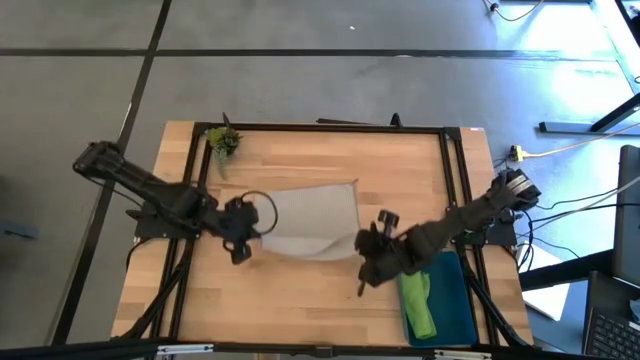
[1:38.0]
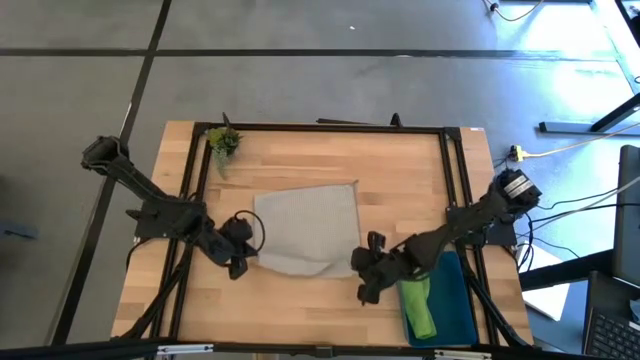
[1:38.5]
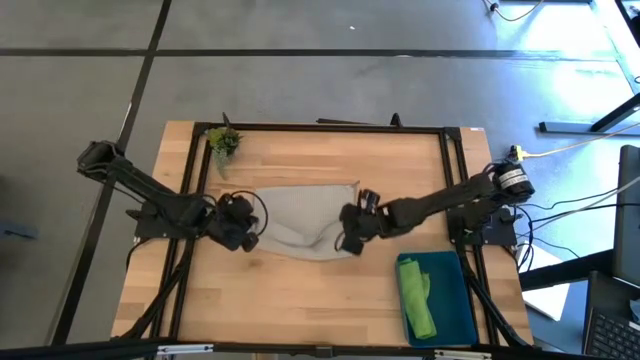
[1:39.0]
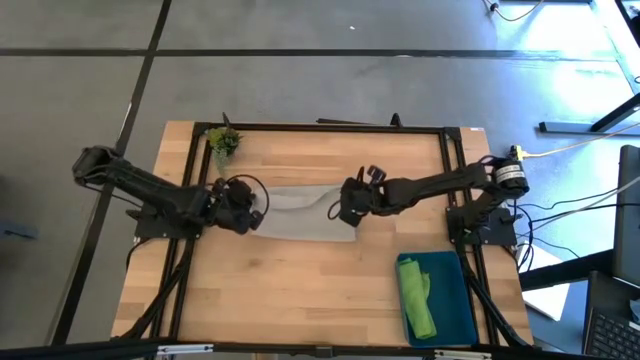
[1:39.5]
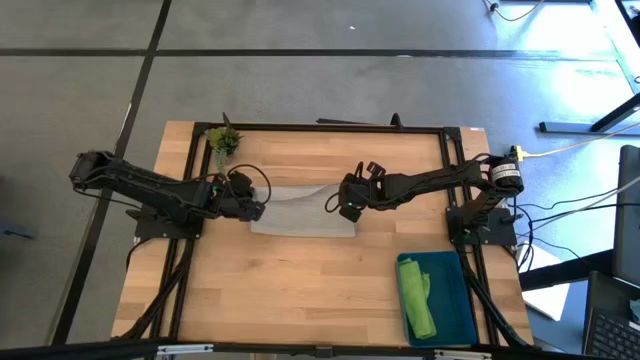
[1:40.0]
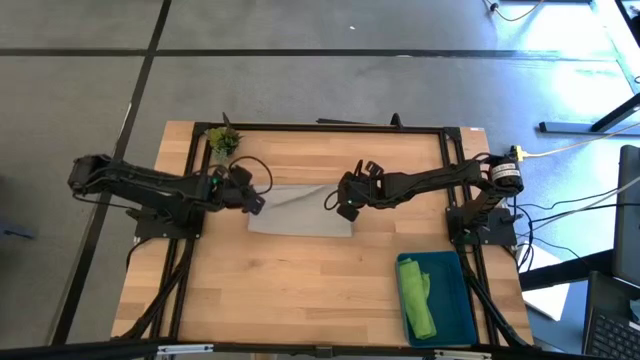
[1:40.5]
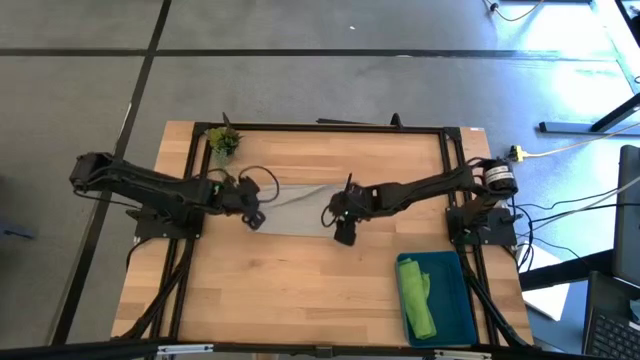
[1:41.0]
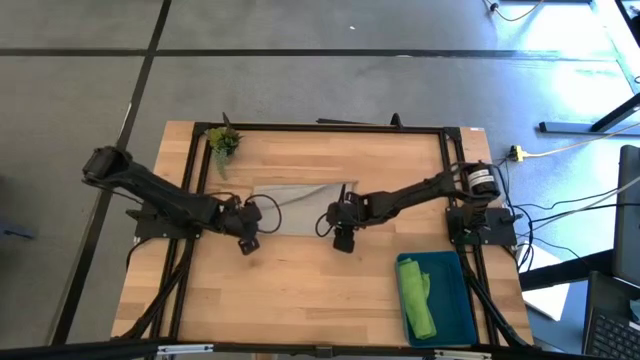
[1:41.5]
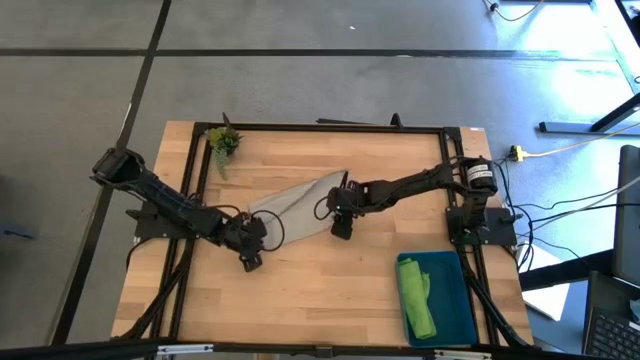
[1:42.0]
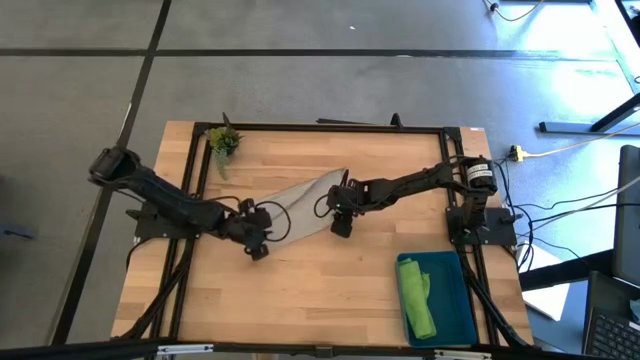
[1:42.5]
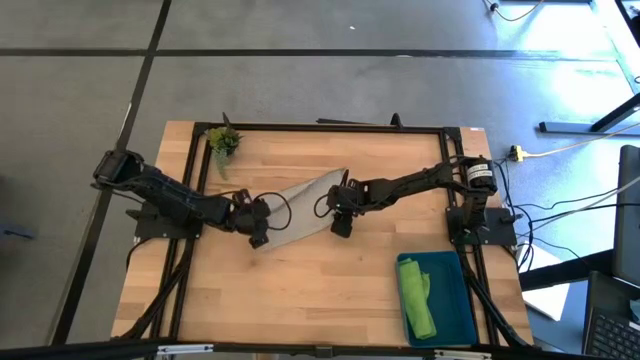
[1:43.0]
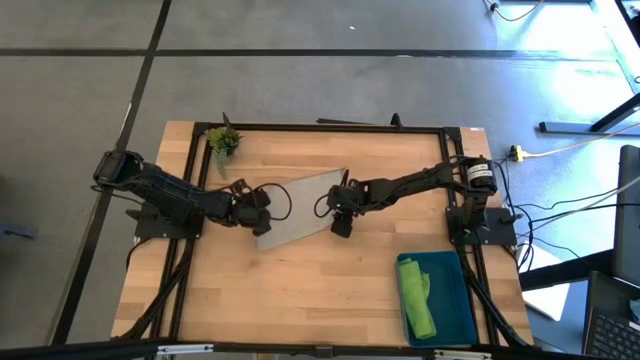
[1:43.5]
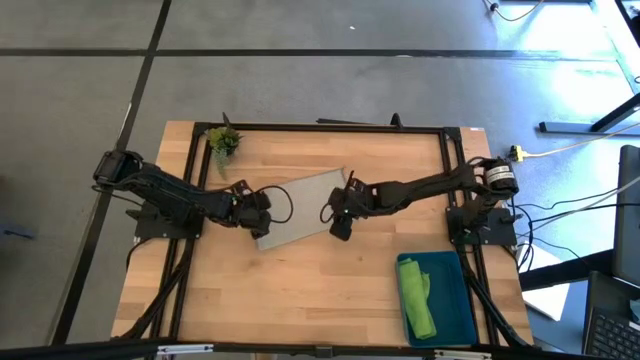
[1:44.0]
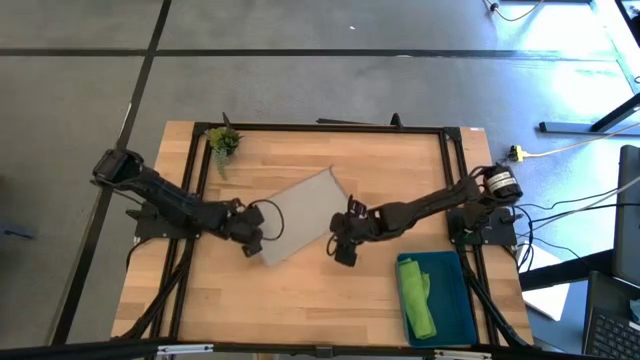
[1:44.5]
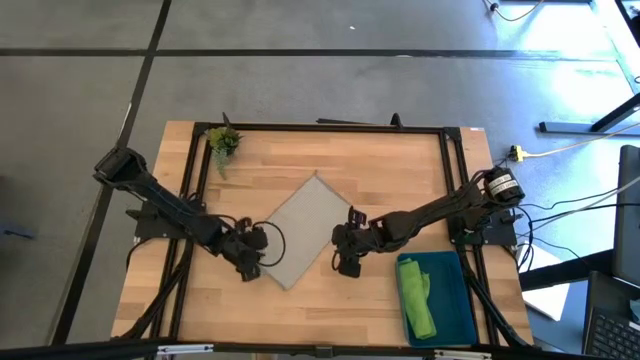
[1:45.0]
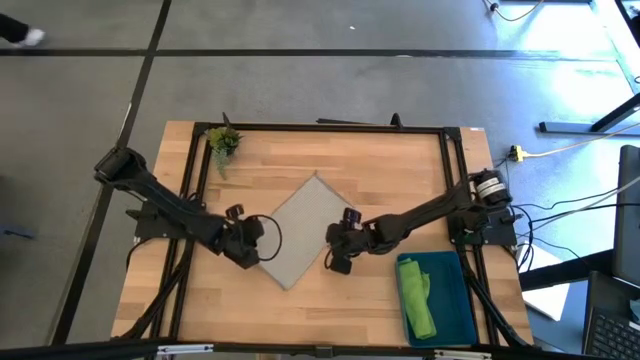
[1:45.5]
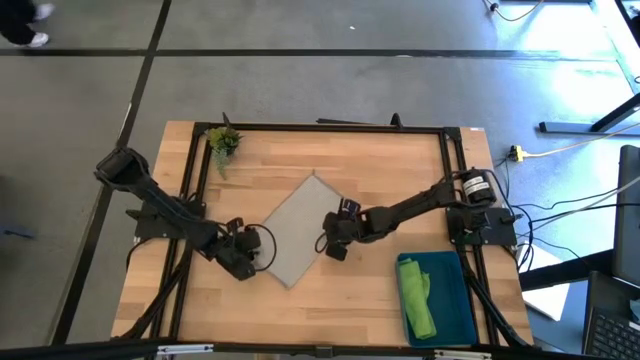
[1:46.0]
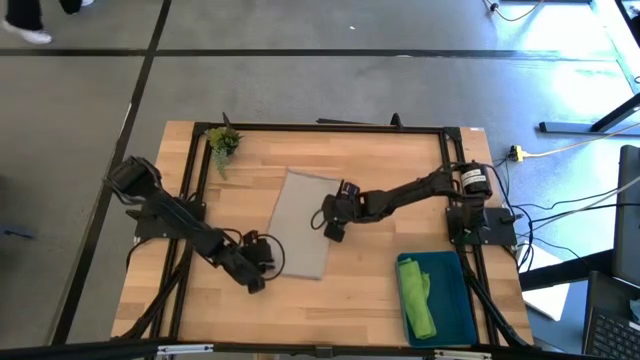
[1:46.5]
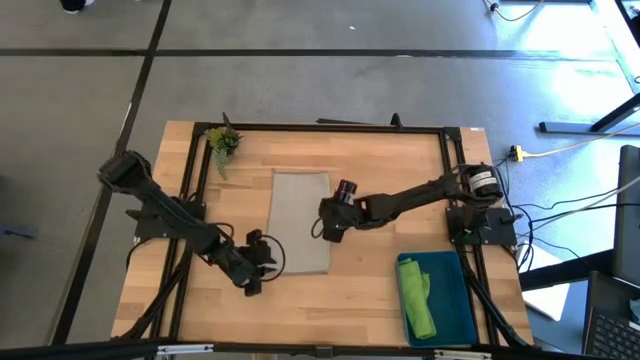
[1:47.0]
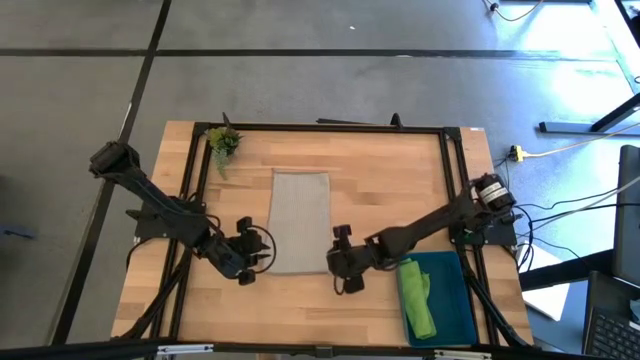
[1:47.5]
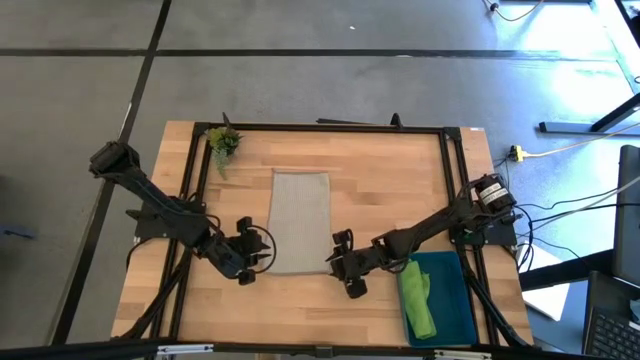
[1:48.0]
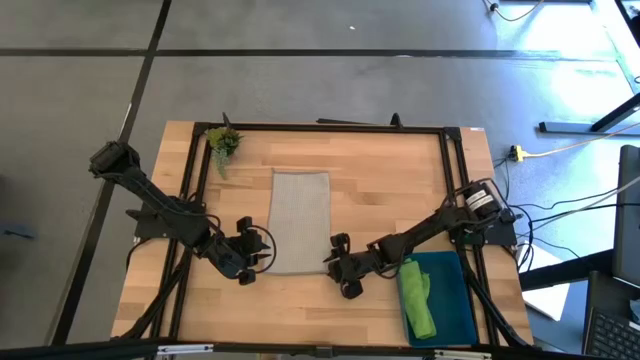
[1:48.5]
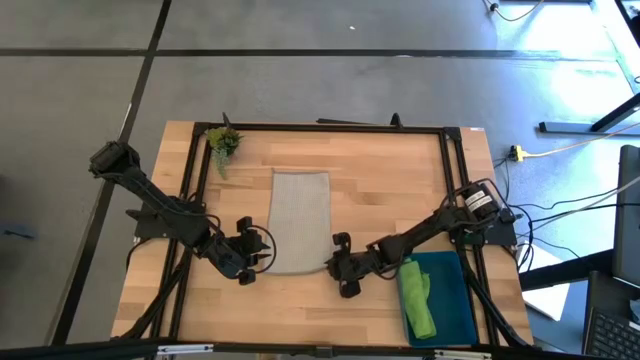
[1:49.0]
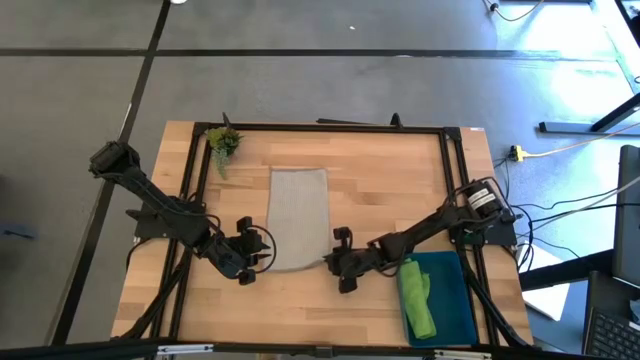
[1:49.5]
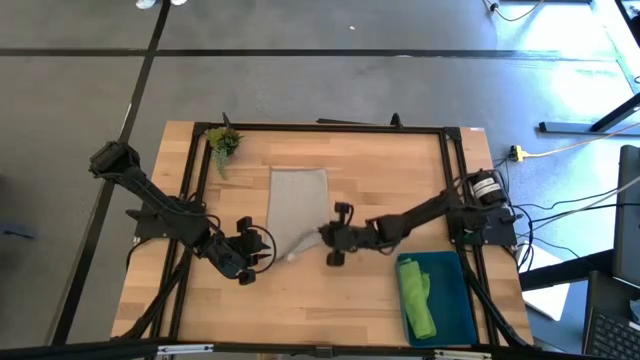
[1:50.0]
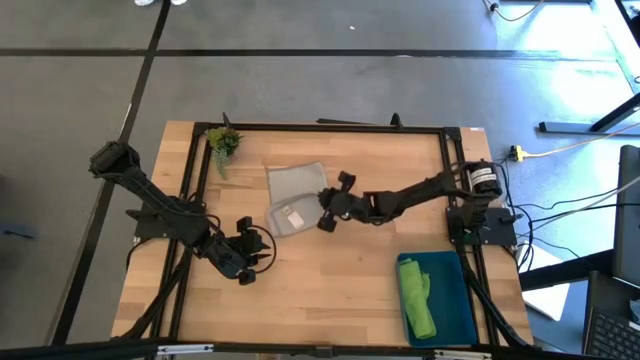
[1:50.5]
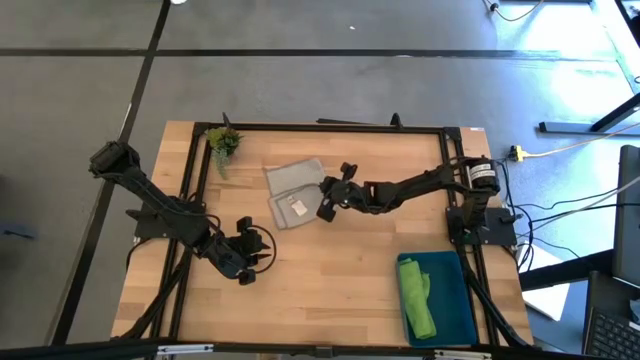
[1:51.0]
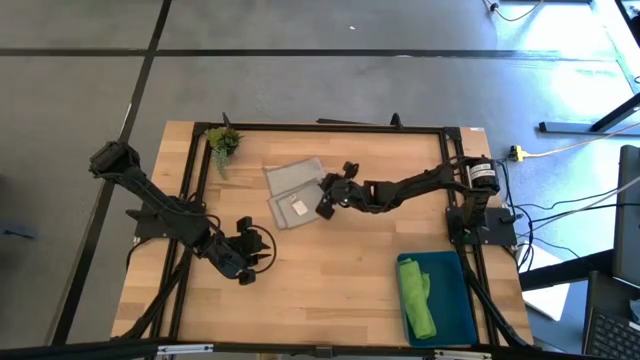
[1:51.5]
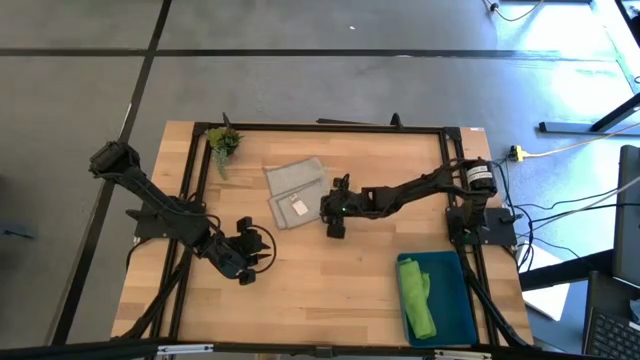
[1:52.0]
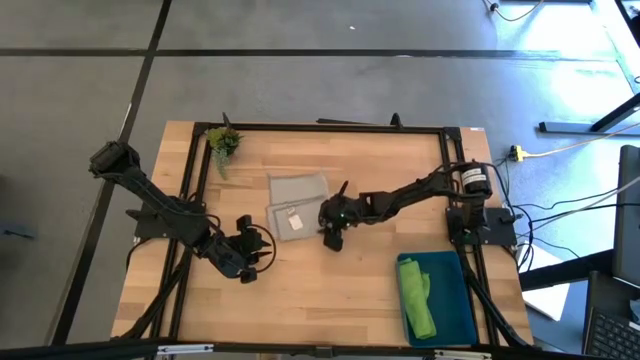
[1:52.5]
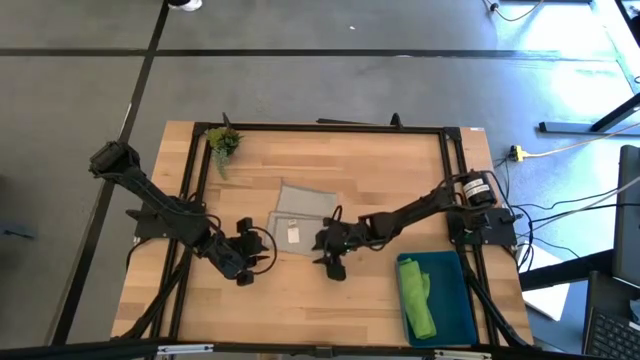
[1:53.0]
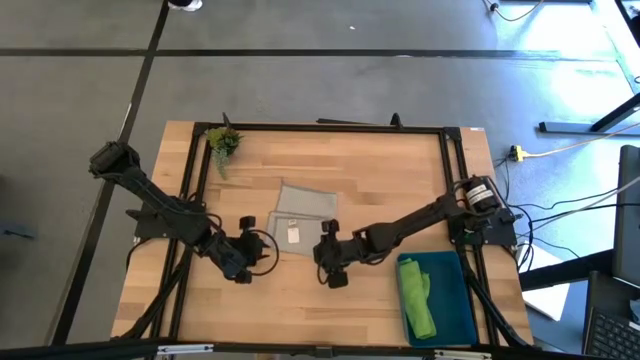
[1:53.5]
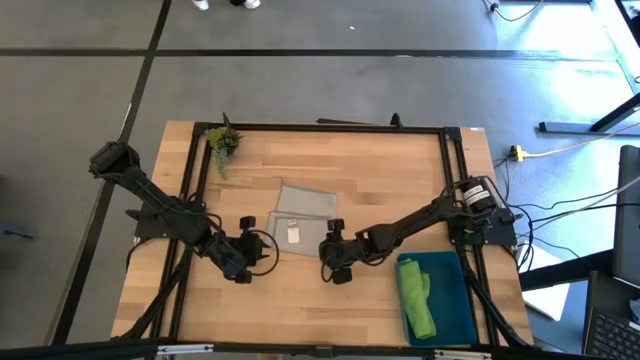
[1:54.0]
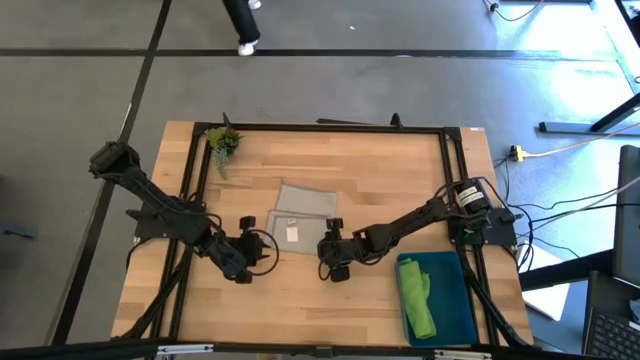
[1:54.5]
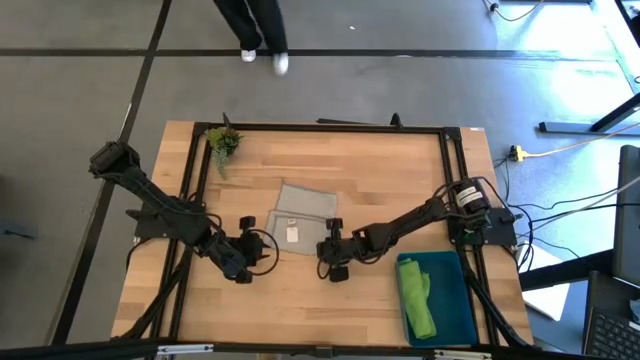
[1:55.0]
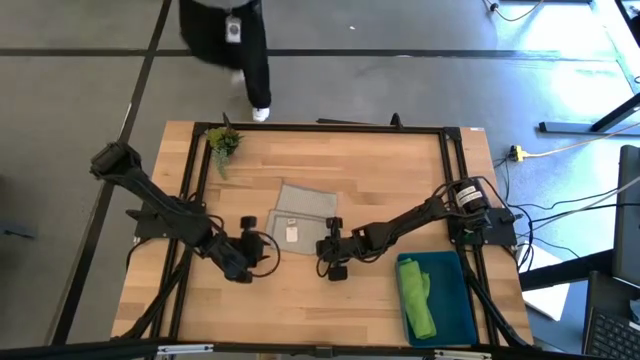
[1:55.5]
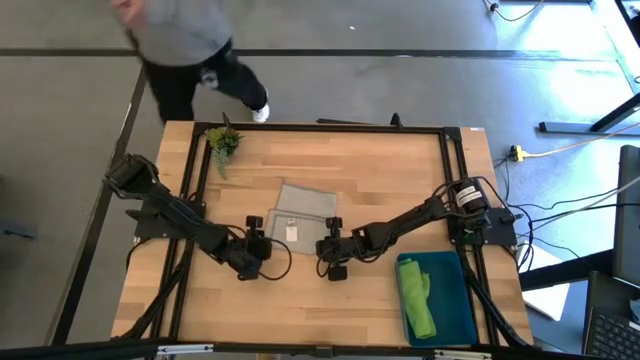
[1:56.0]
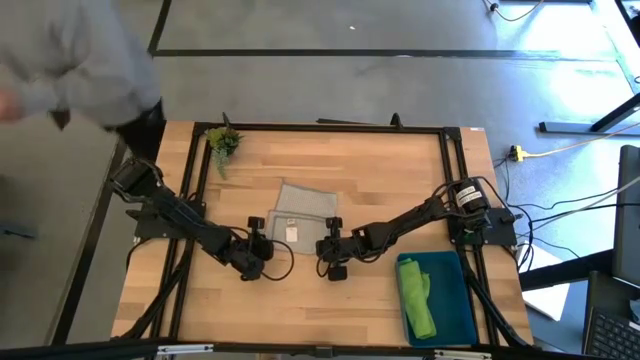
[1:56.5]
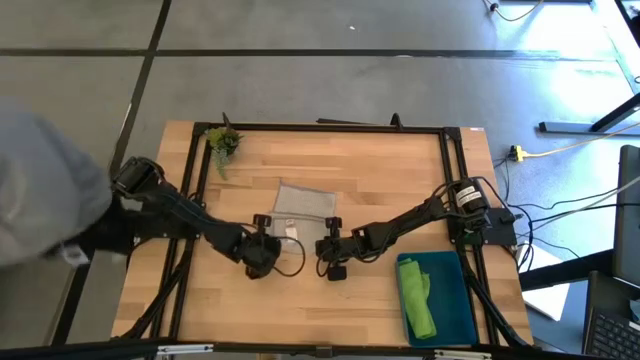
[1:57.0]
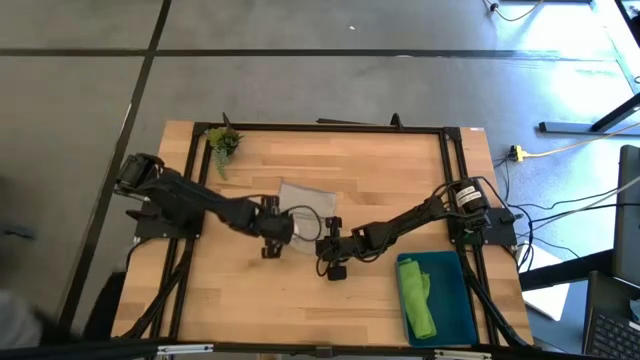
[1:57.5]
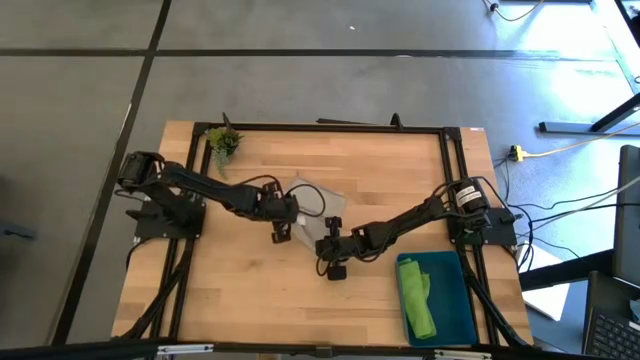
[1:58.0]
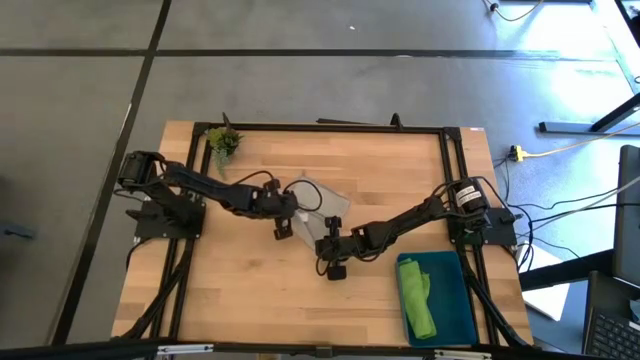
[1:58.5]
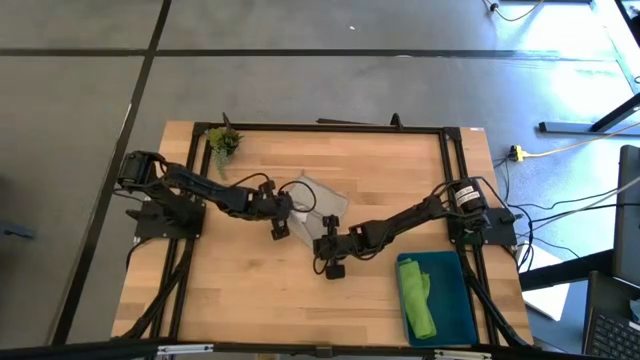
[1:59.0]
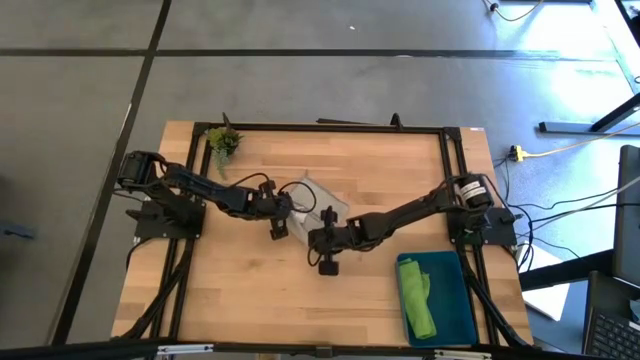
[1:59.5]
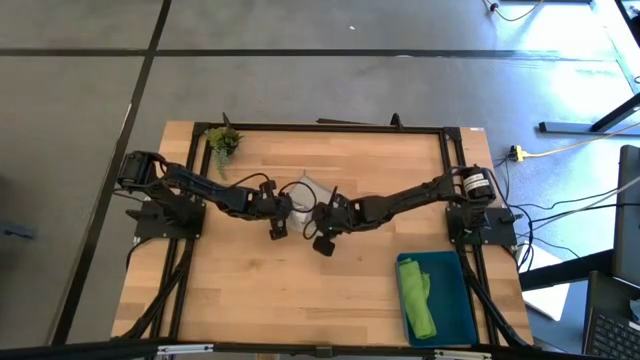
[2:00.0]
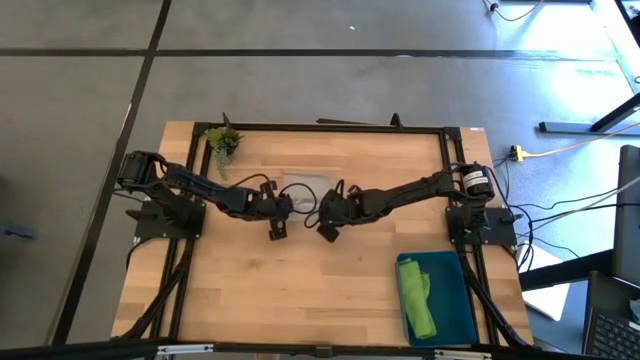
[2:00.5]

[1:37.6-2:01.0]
Task: Roll microfiber towels into tight, uniform cylinder then place into a basket
Roll the gray microfiber cloth
